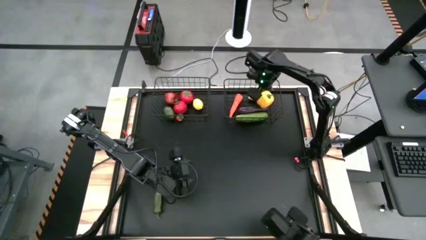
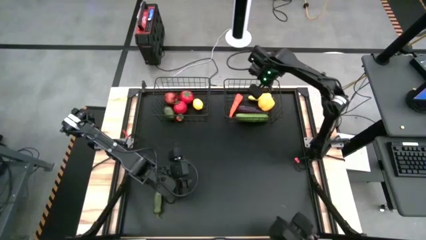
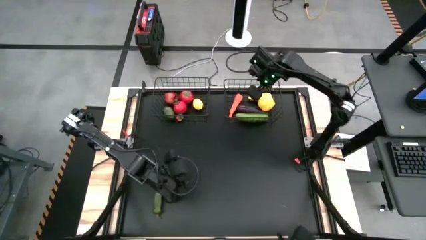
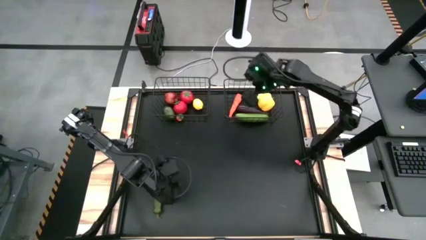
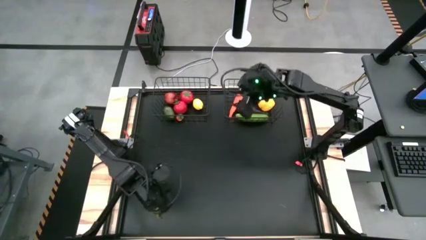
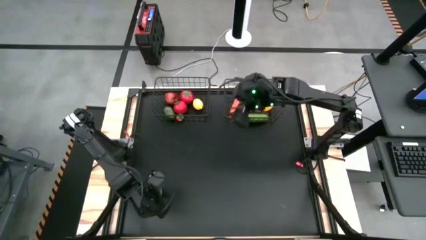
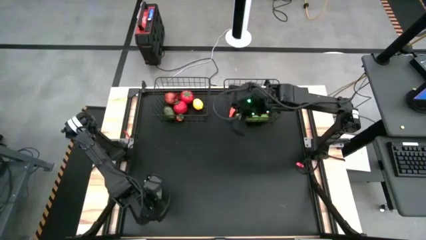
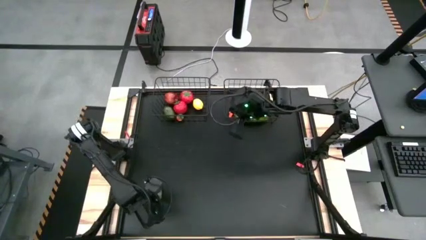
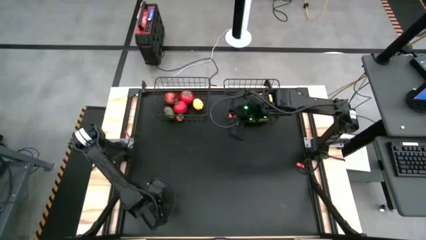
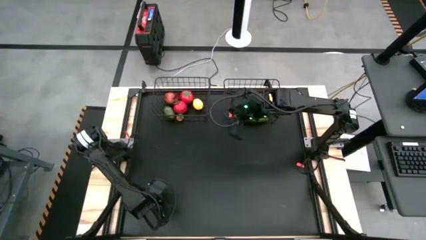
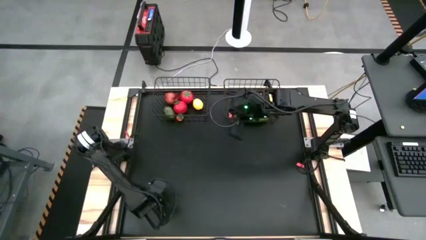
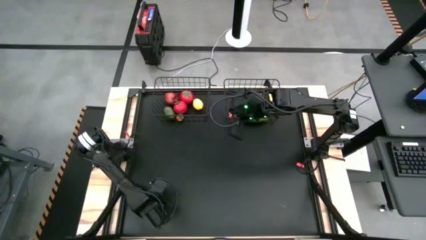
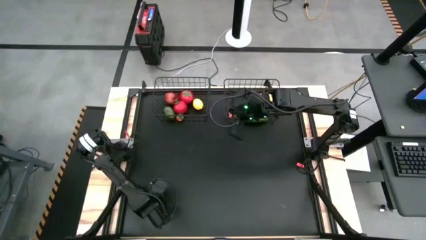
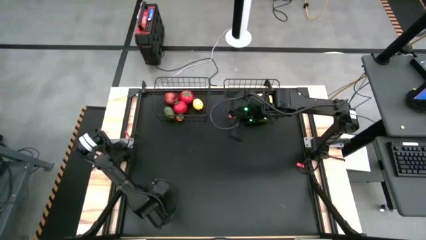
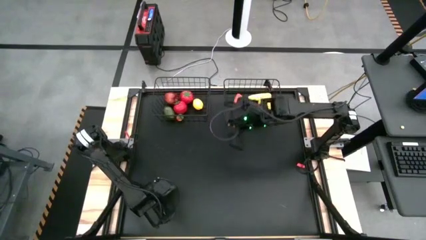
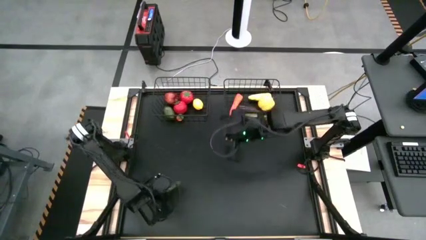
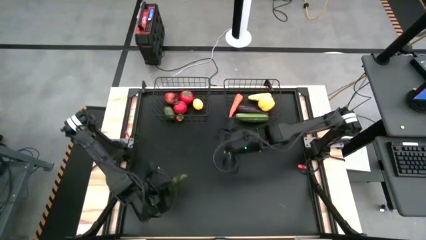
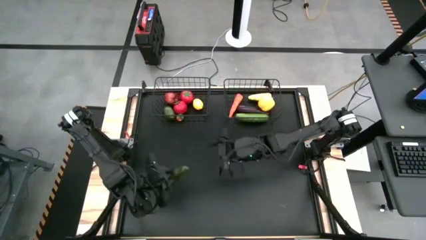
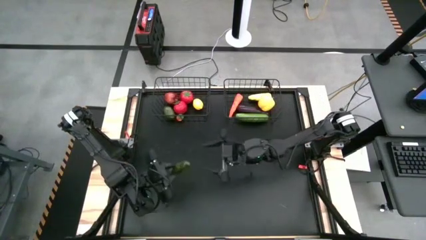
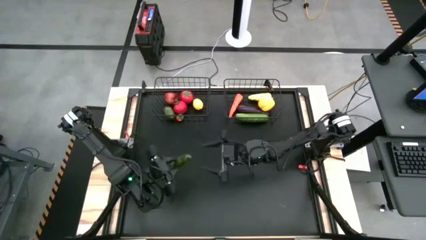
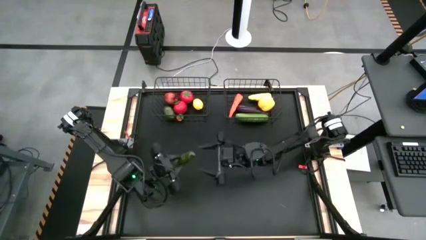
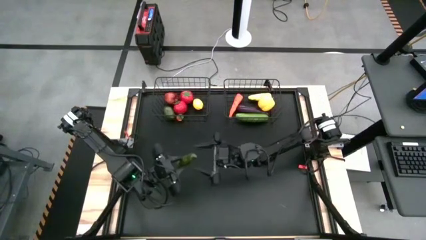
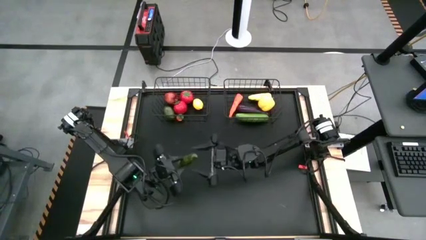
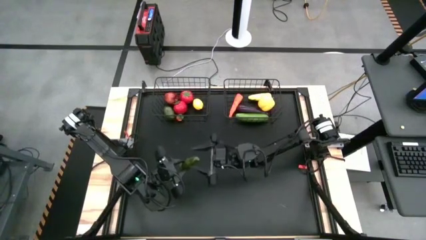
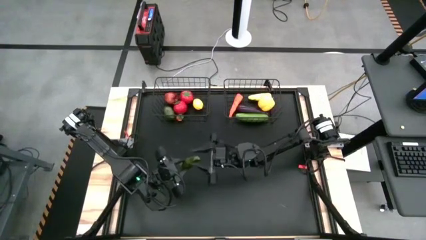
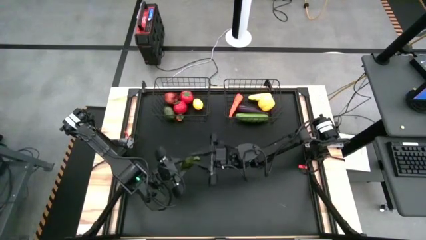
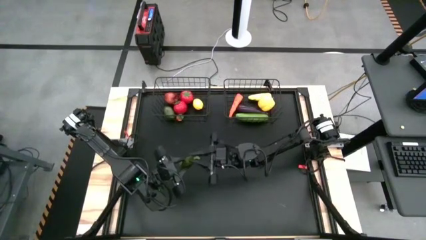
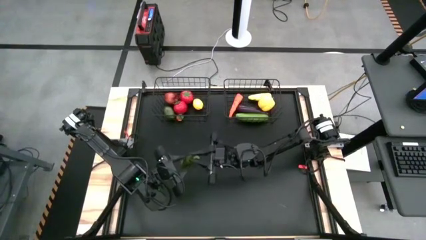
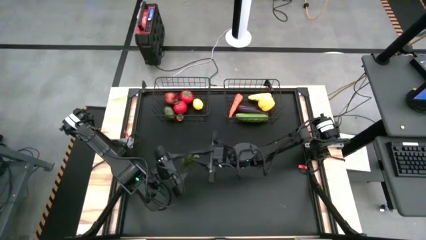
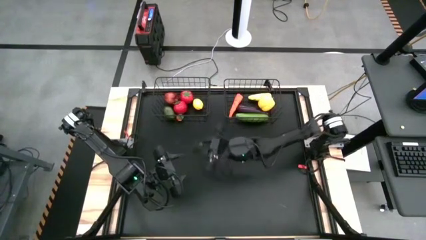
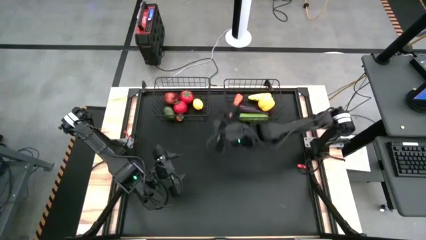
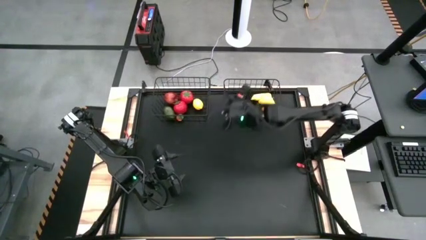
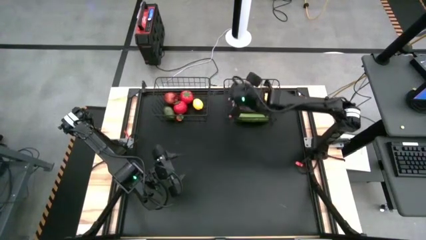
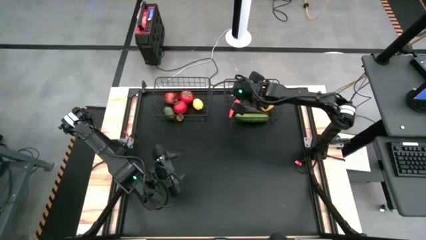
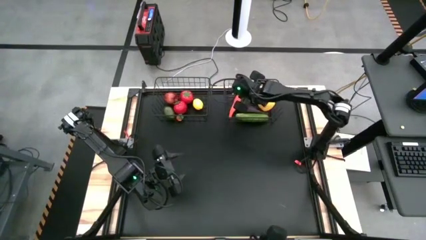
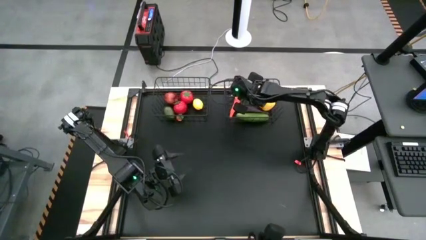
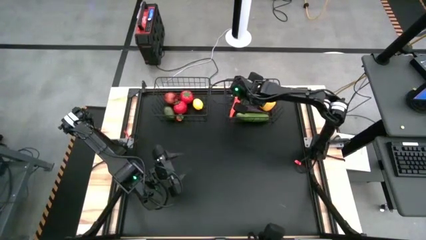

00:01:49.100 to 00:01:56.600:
Task: Sort produce into baskets
Put the chili pepper into the right wire basket

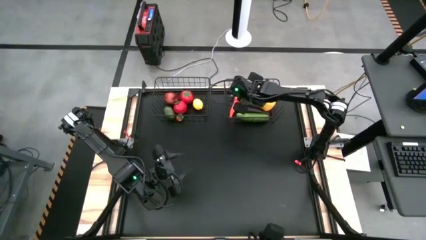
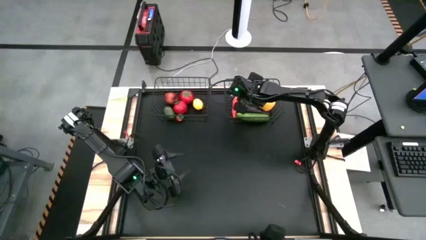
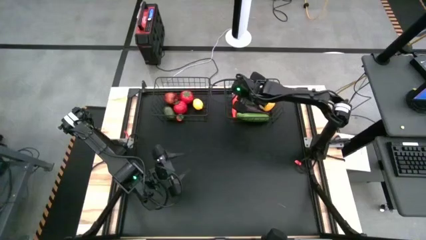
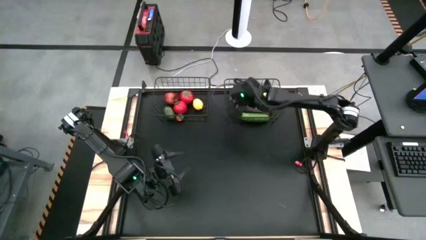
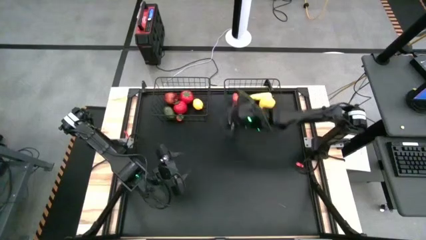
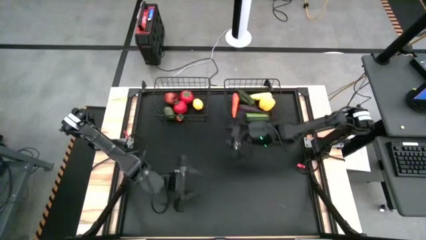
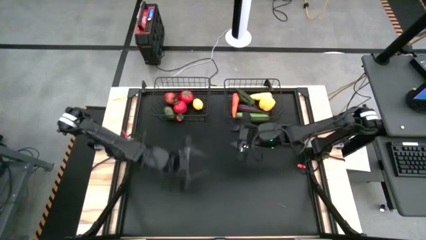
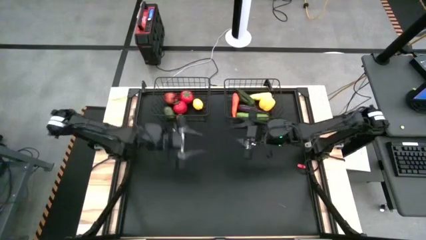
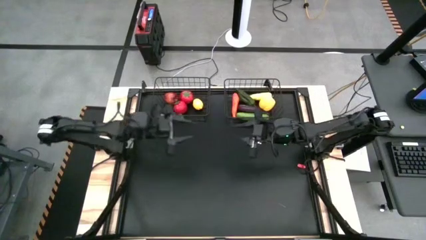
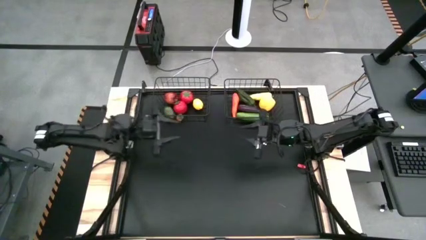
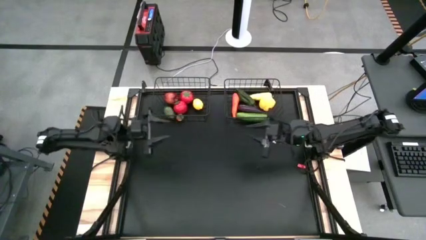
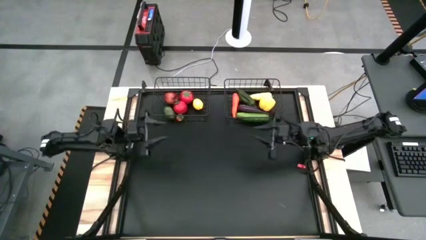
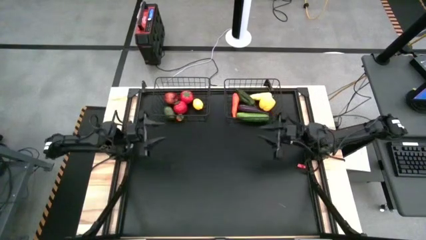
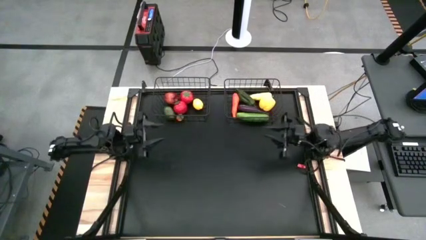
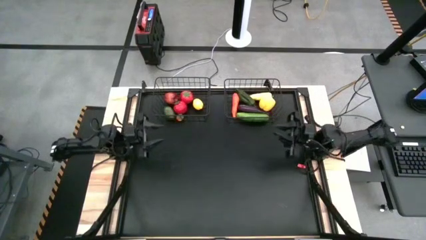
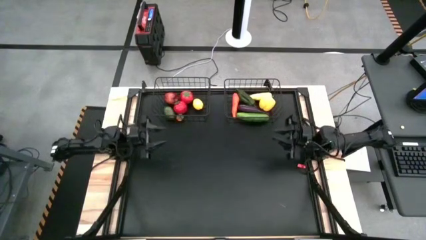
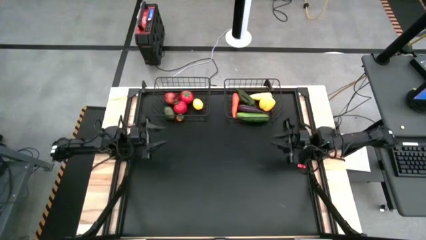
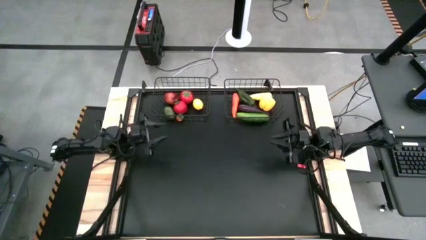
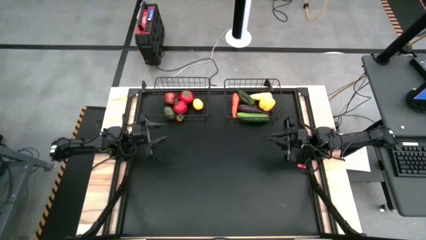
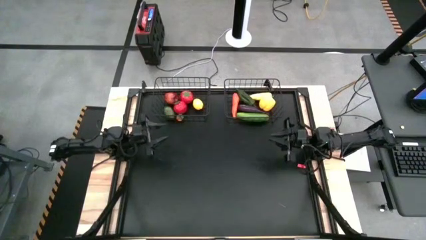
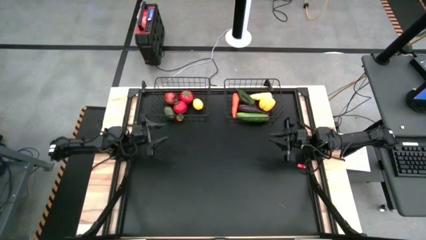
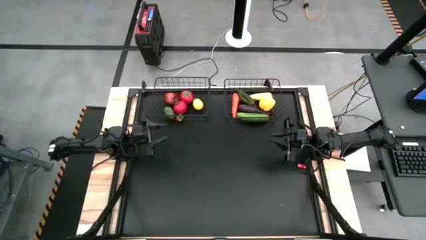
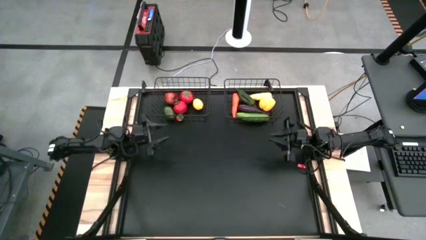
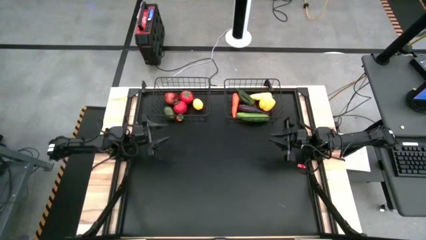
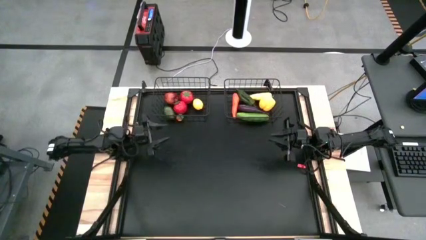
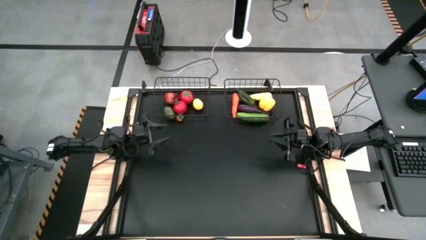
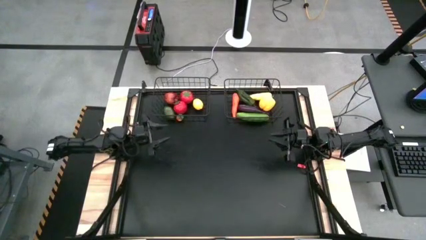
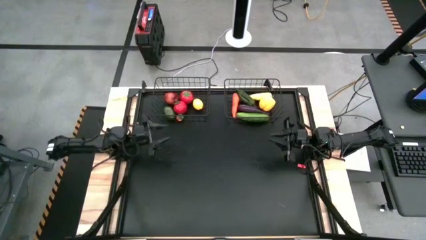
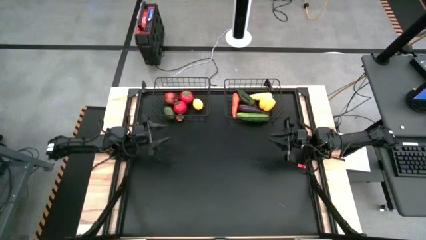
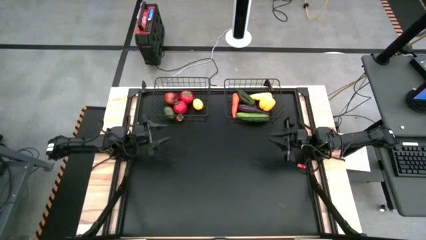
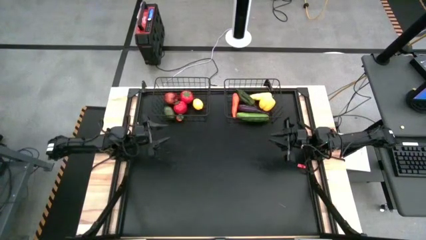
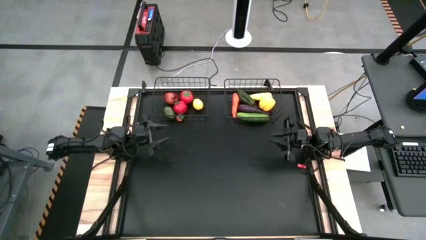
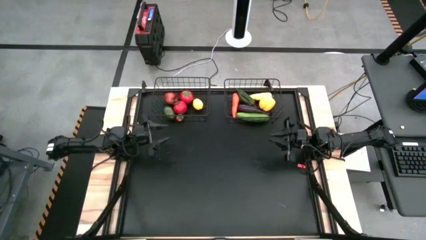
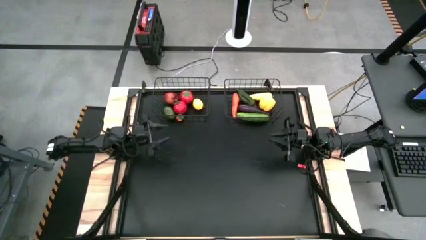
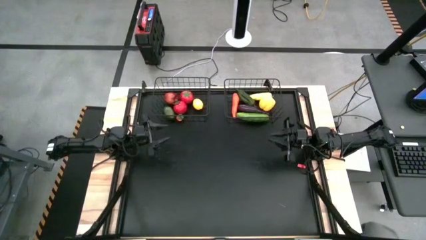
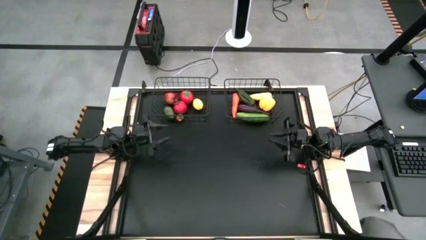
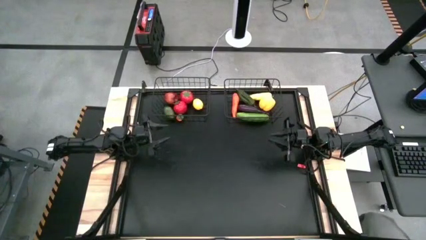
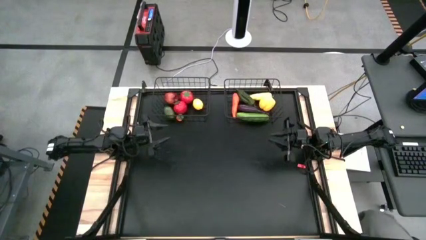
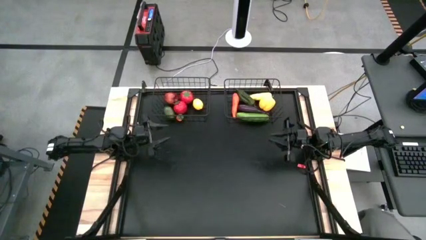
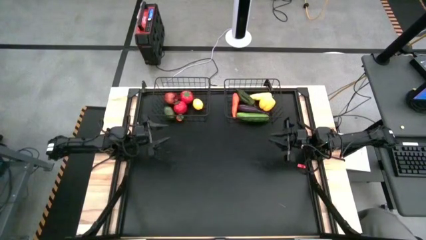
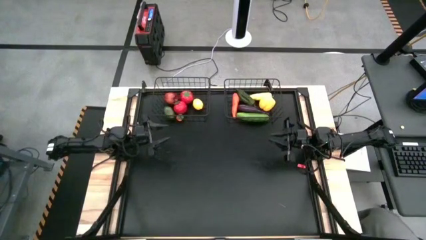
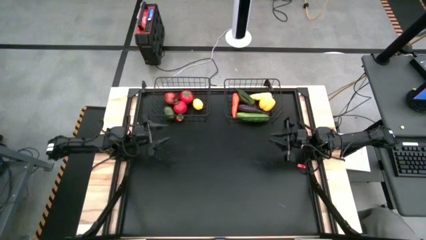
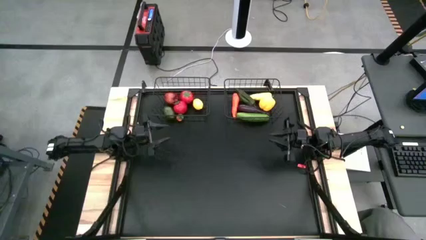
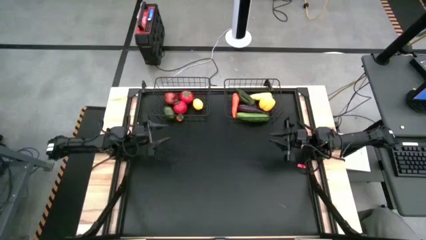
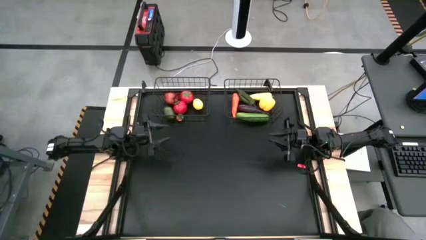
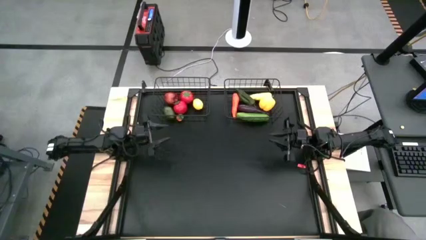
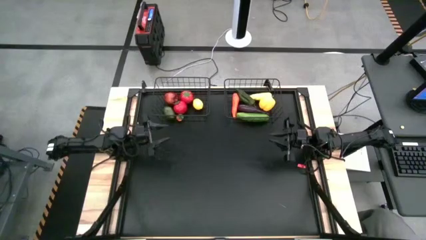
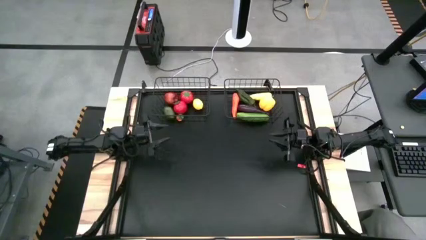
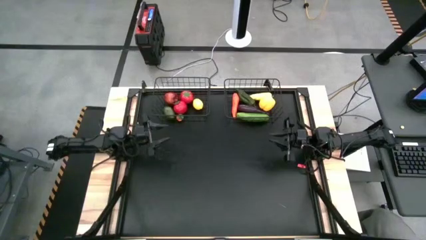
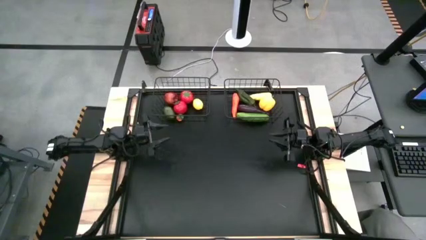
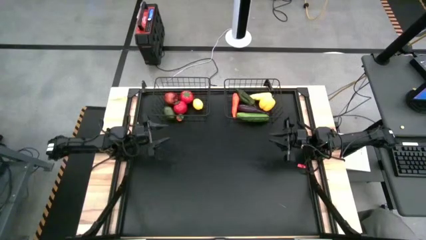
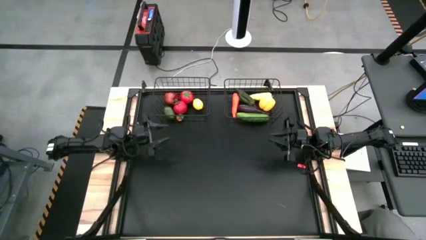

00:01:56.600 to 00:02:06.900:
Return to Home Position
